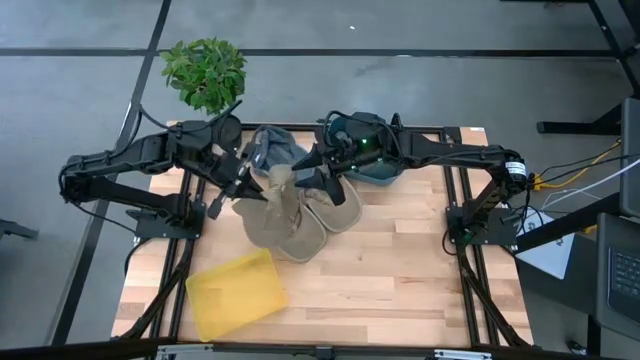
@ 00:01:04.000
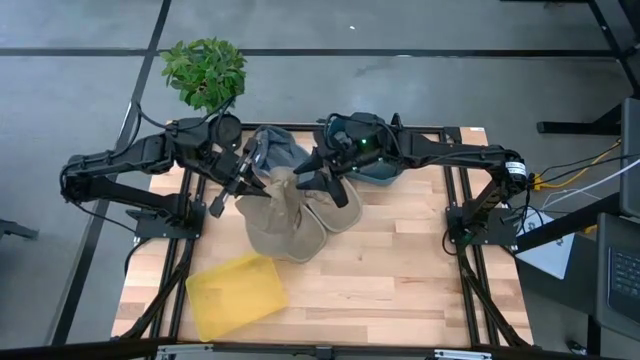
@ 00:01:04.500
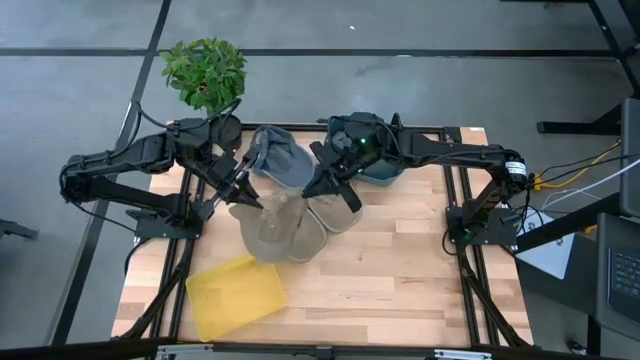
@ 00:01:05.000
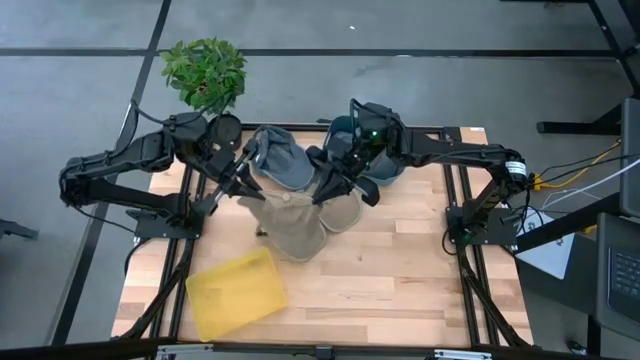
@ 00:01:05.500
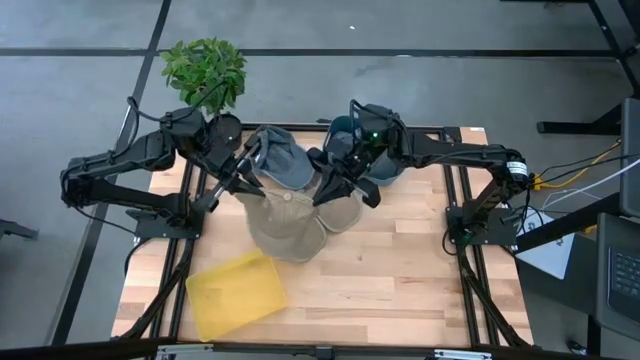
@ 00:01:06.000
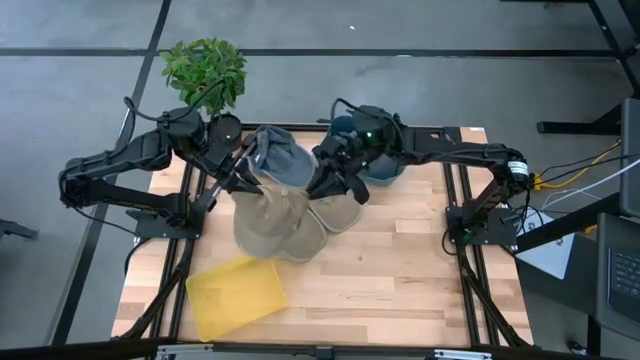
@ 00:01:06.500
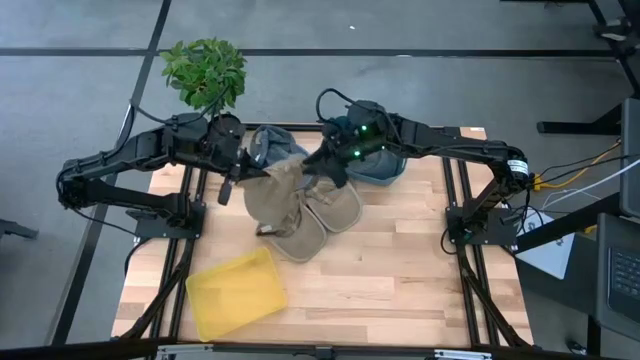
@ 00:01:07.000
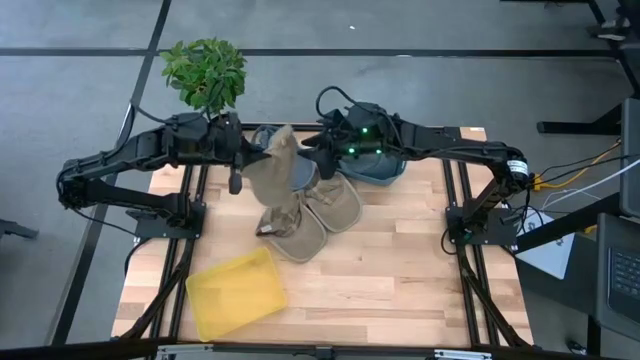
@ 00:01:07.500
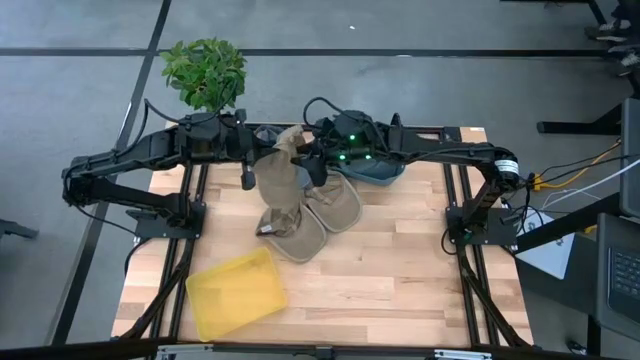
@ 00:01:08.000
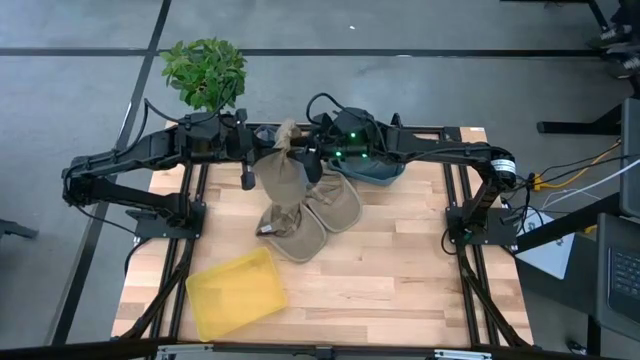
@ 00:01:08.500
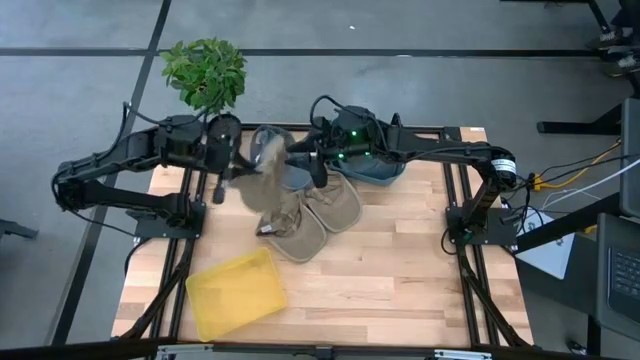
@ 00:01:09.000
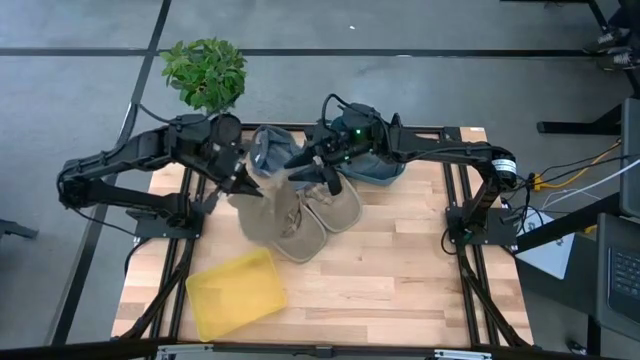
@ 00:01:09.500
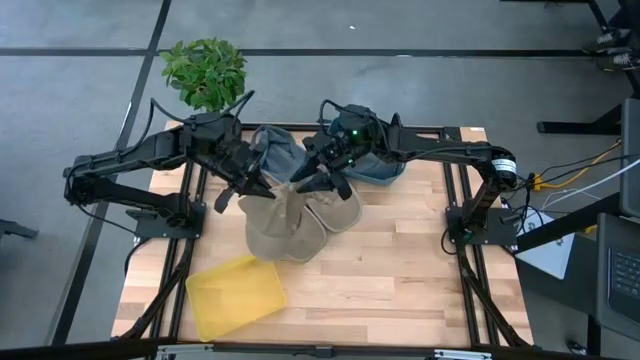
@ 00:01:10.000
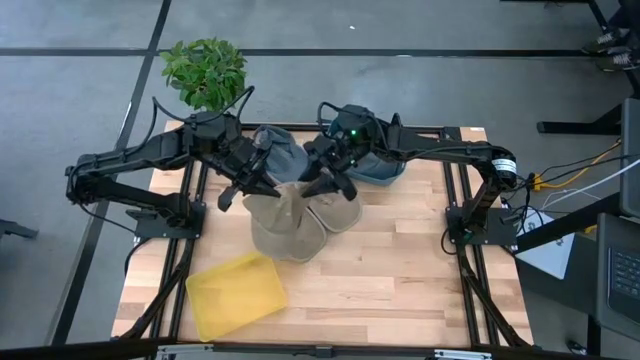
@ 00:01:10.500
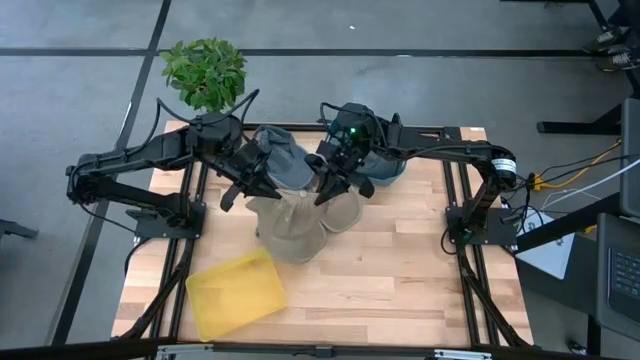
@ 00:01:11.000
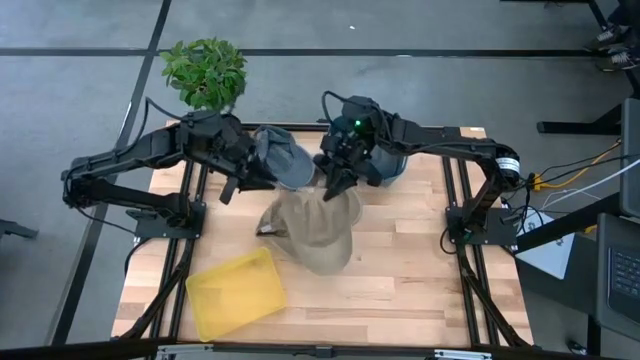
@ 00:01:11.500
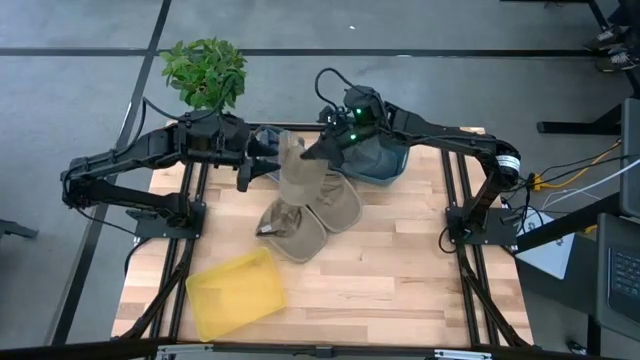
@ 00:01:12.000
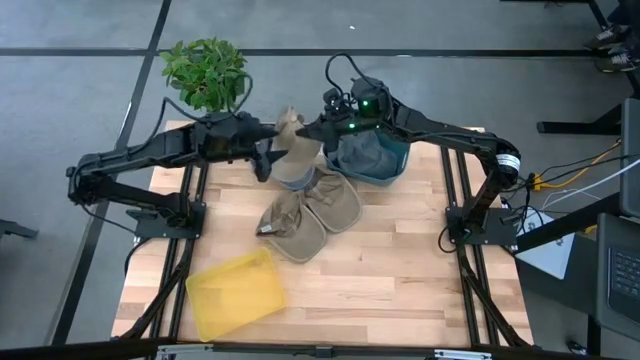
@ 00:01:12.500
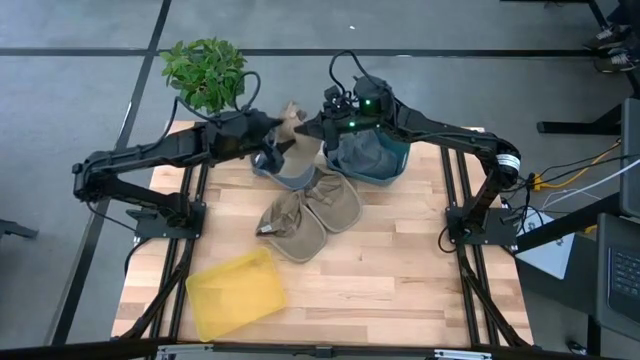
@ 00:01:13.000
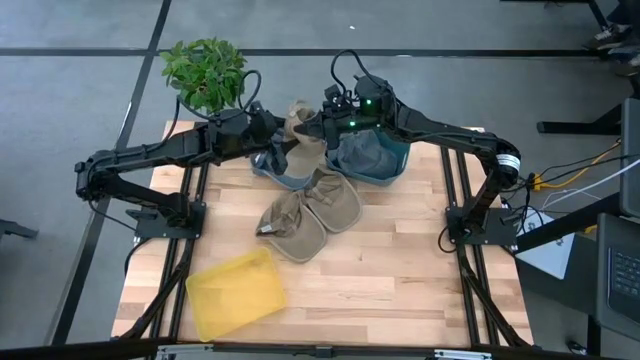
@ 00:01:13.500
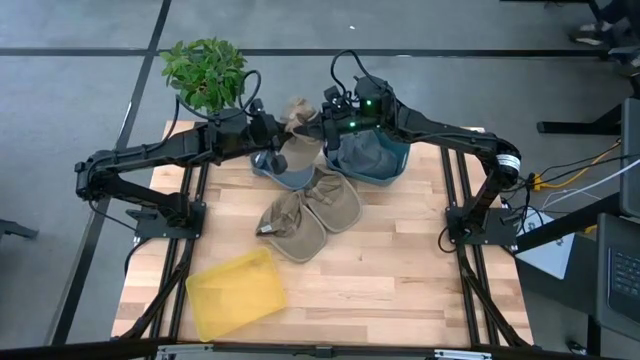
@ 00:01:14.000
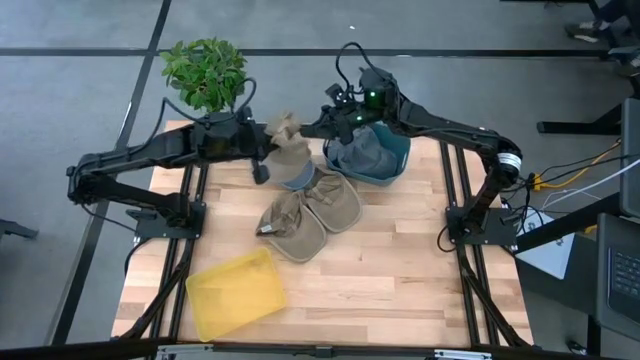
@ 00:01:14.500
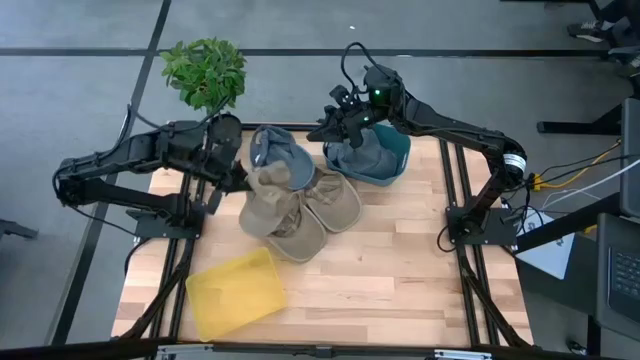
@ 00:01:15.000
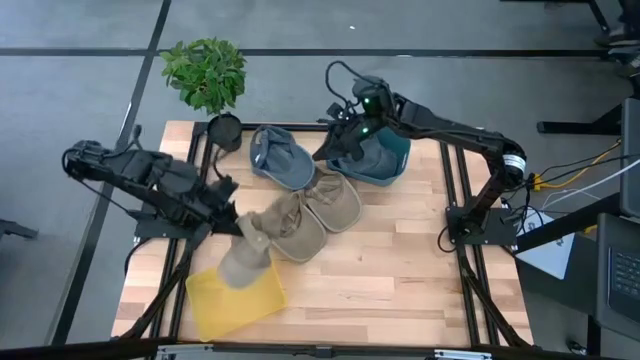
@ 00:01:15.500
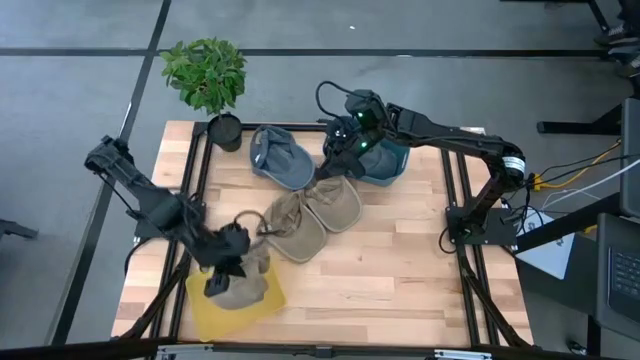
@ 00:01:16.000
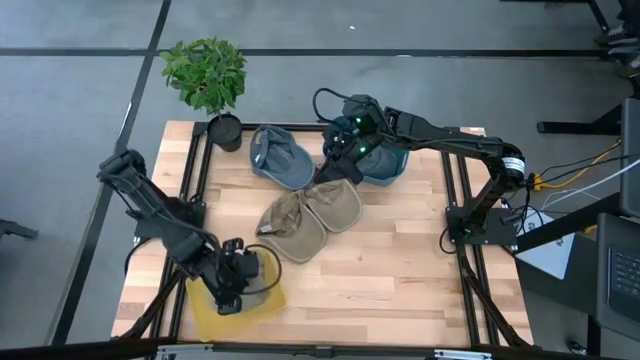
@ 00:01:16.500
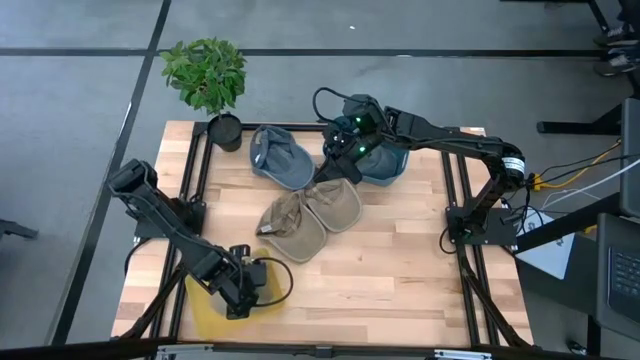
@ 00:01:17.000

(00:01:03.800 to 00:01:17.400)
Task: Pick & Place hat
Put the right brown cap into the yellow bin

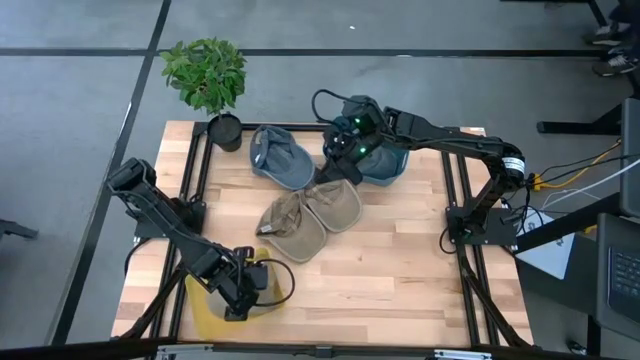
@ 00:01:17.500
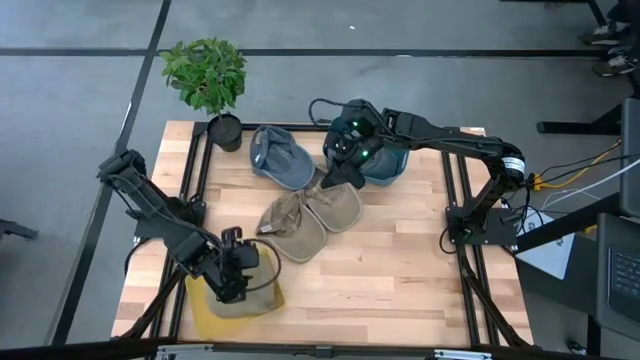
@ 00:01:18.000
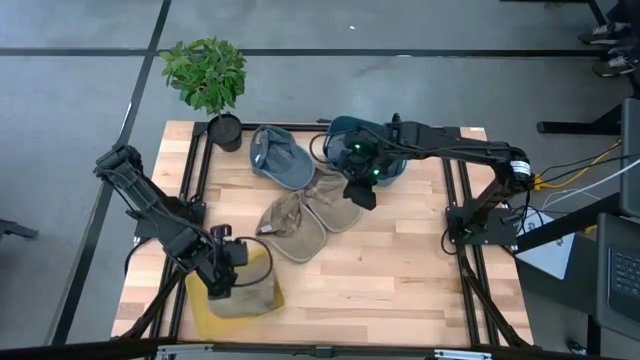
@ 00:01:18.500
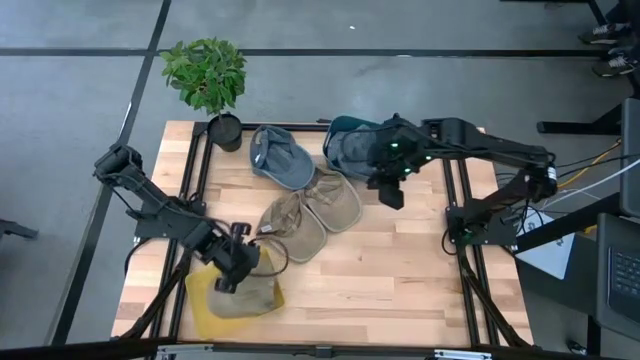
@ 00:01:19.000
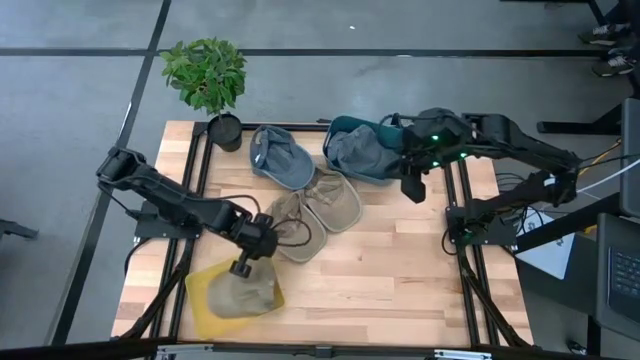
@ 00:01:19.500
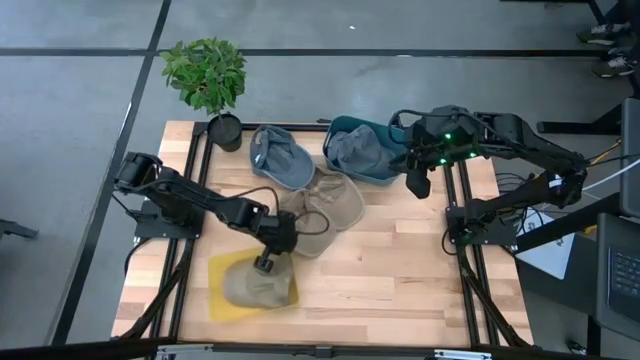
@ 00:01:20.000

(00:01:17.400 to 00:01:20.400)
Adjust the yellow bin

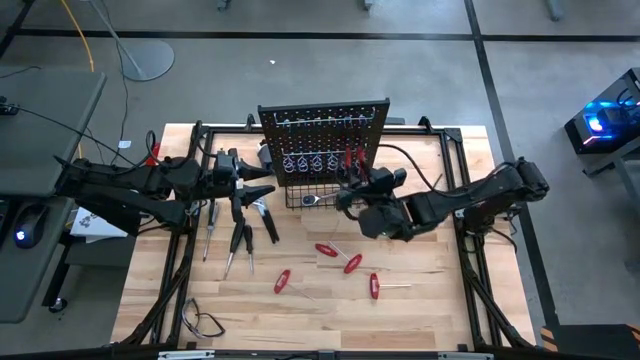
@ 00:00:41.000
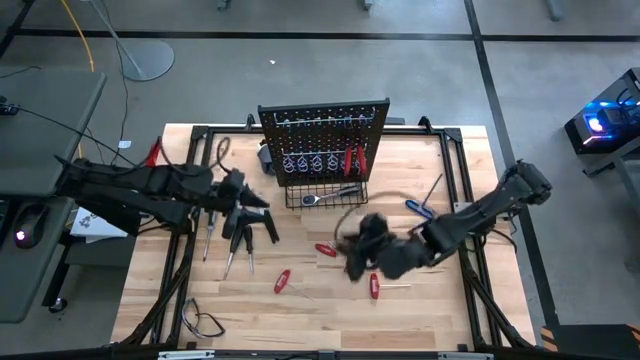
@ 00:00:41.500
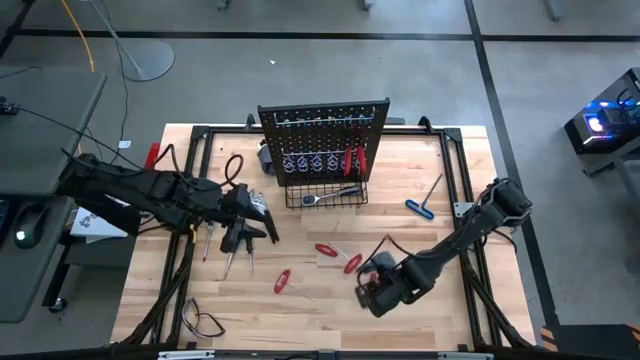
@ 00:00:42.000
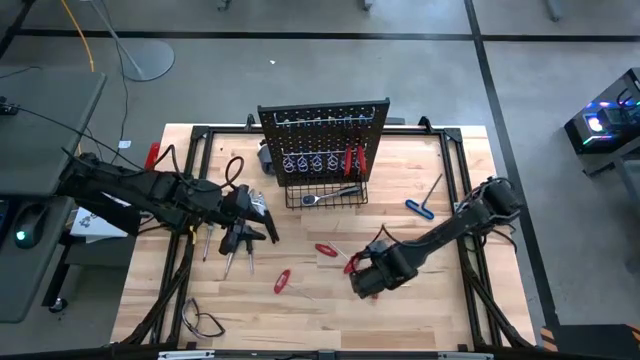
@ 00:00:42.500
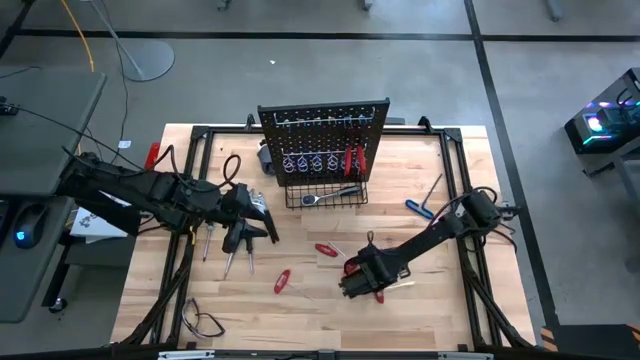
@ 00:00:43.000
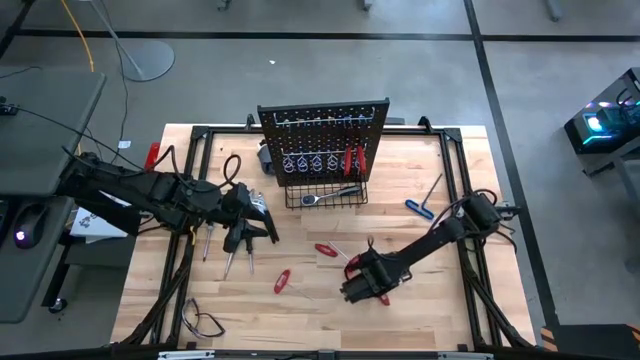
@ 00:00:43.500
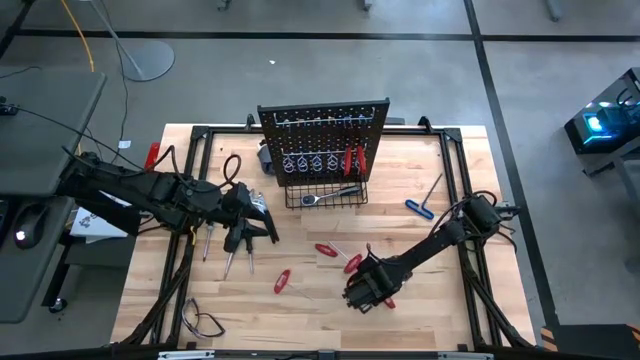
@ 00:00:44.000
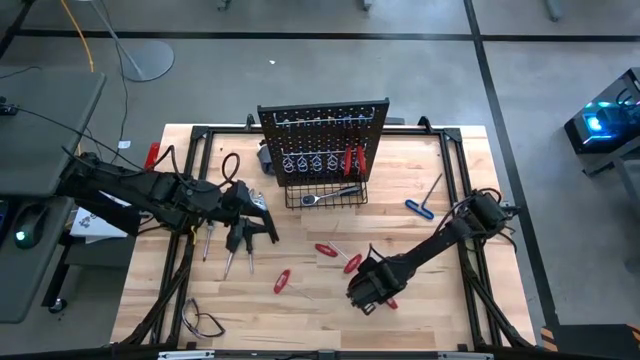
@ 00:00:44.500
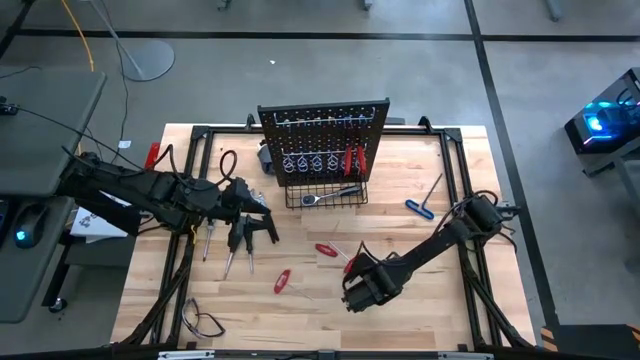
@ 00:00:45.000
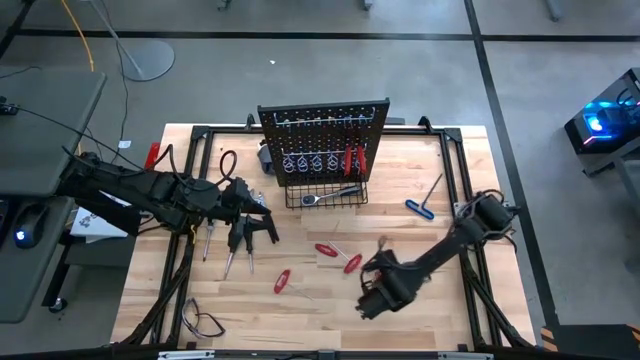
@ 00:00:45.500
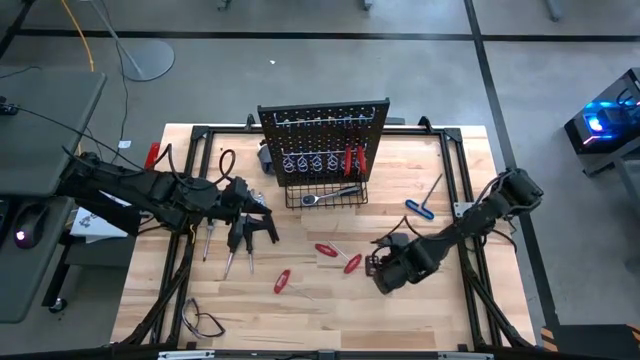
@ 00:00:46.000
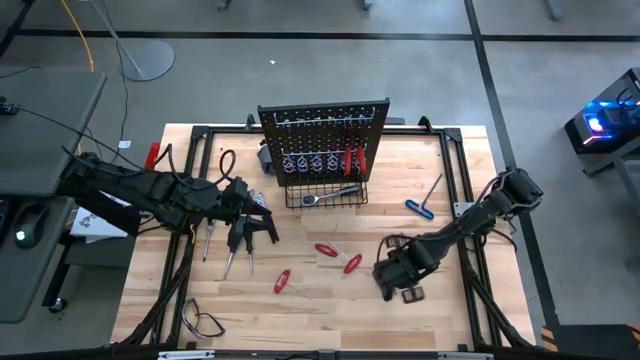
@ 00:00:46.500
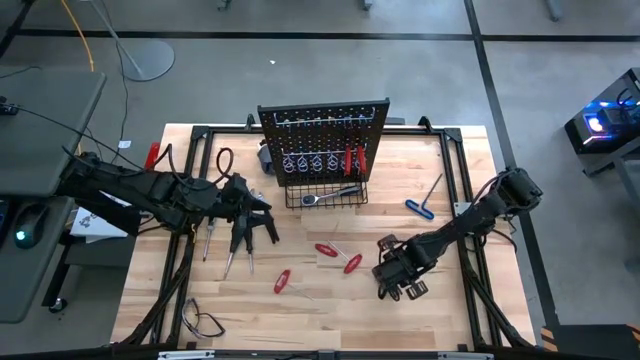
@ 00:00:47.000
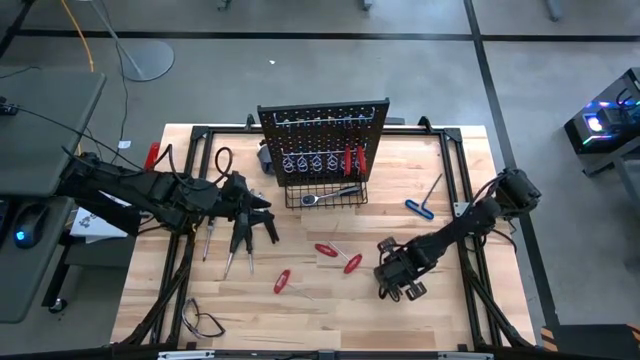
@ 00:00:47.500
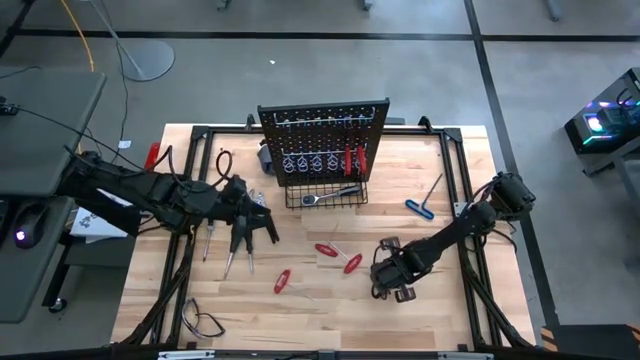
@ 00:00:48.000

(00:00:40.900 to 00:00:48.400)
Task: Hang tools onto peg board
Hang the red allen wrench on the peg board
